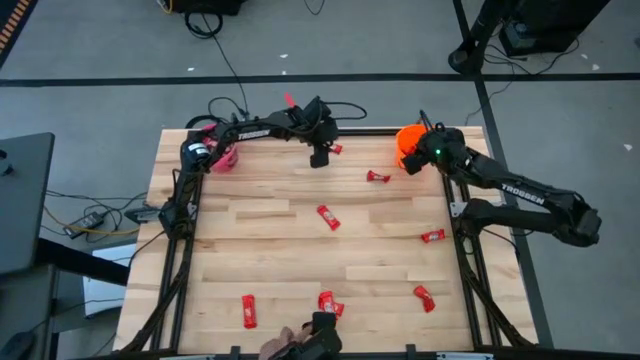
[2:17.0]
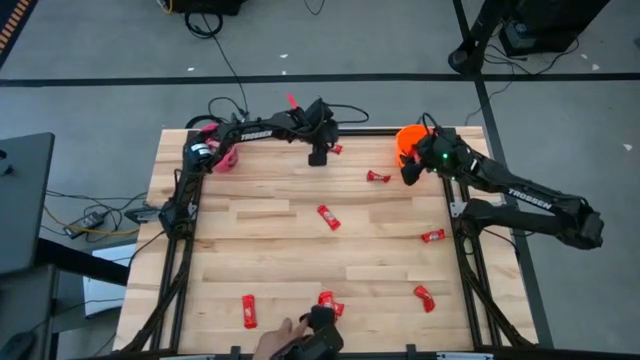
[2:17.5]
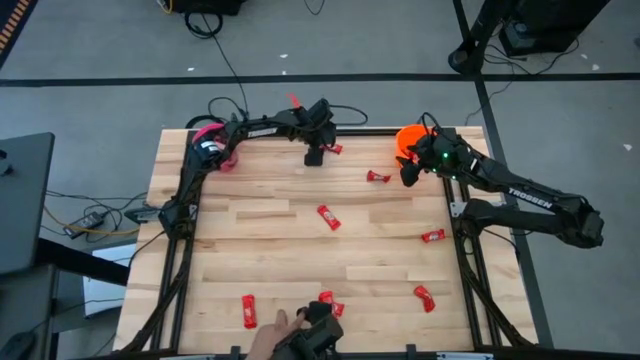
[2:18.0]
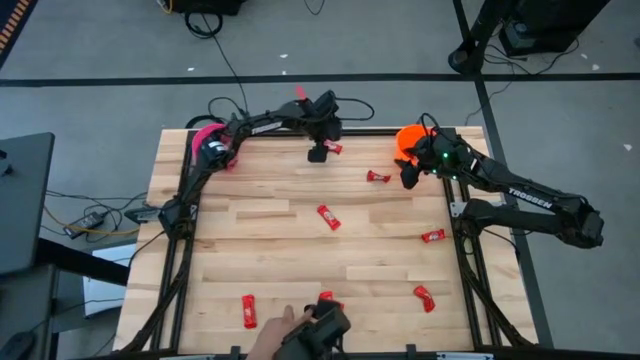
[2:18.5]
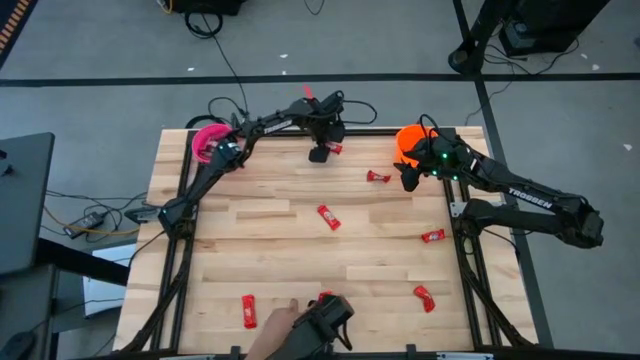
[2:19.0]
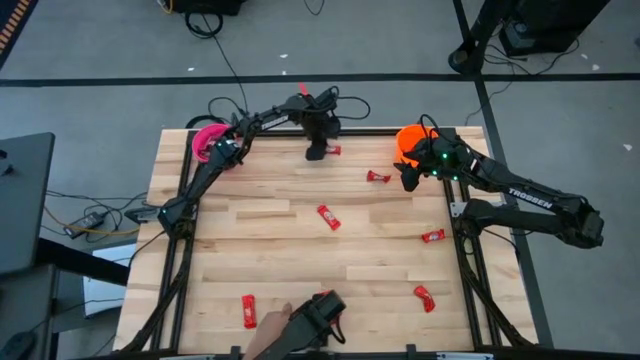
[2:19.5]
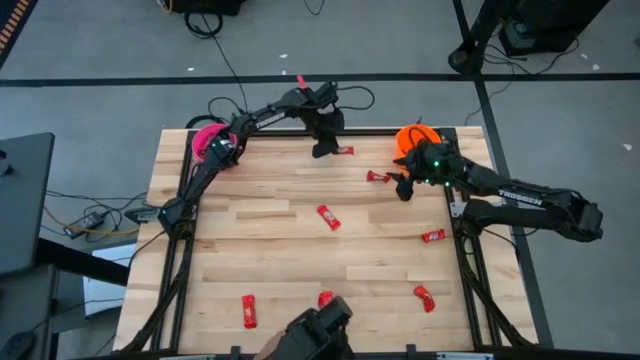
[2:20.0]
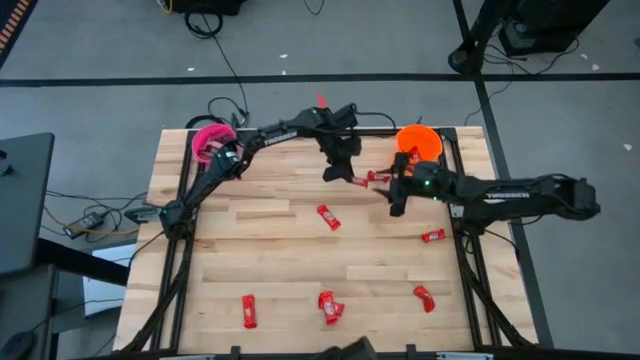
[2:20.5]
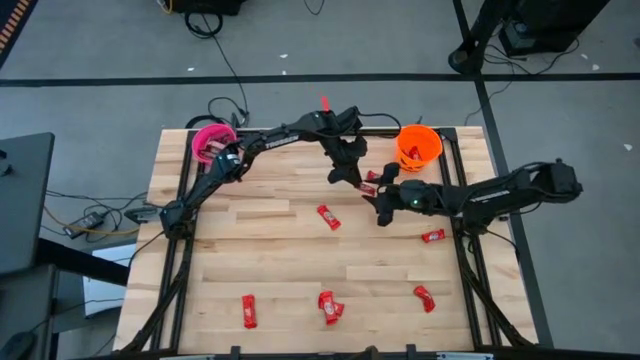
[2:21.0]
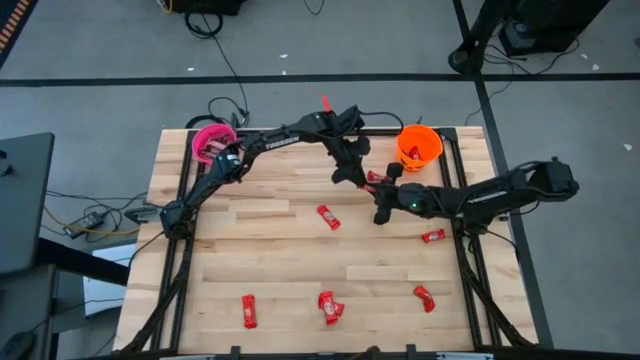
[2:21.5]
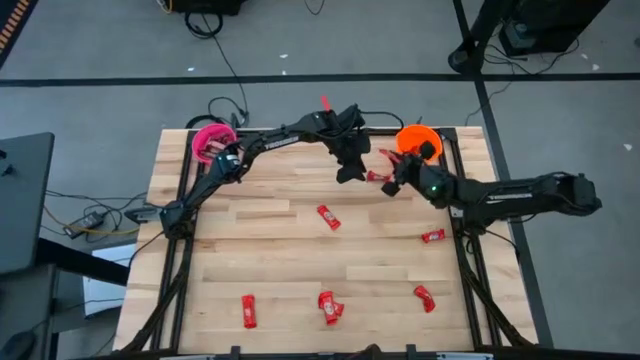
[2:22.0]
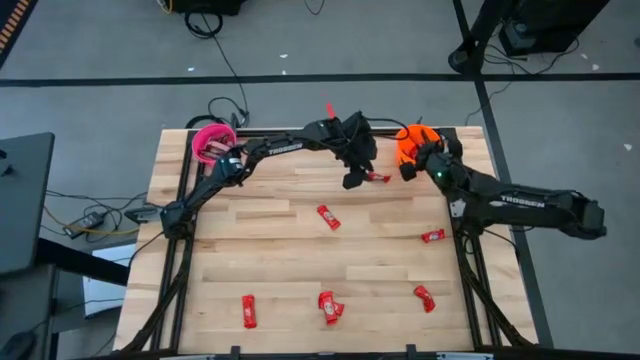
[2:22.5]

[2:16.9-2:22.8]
Task: Sort candy by brand, put in halloween buckets
Put the red chocolate bar into the orange bucket

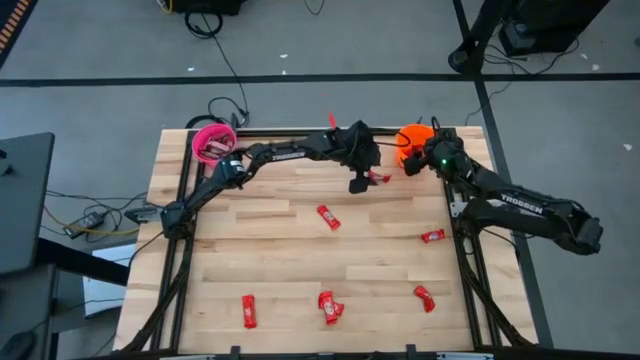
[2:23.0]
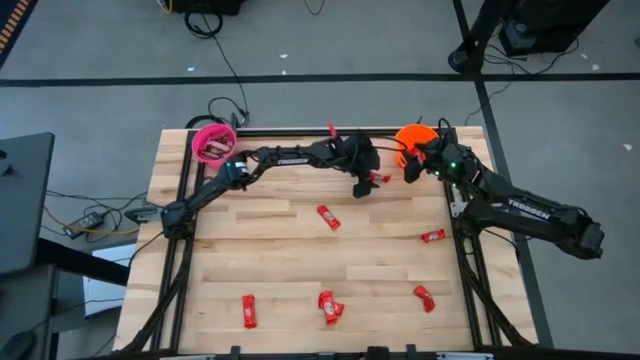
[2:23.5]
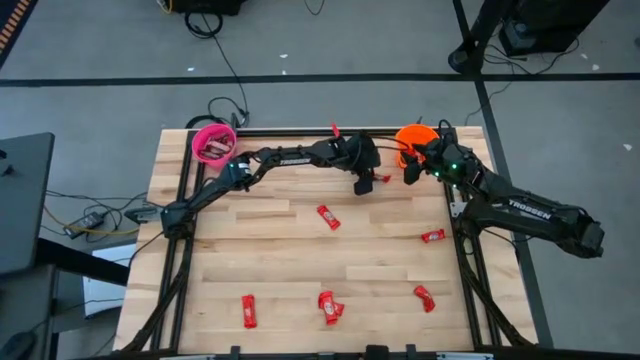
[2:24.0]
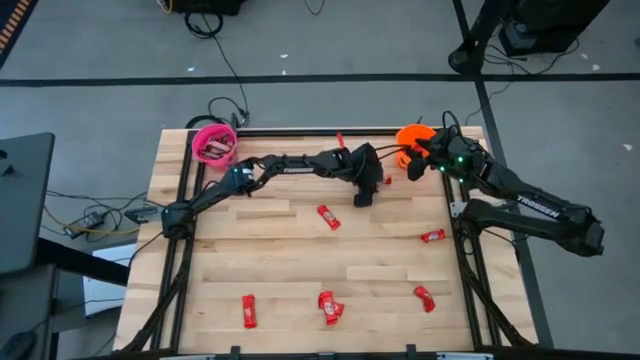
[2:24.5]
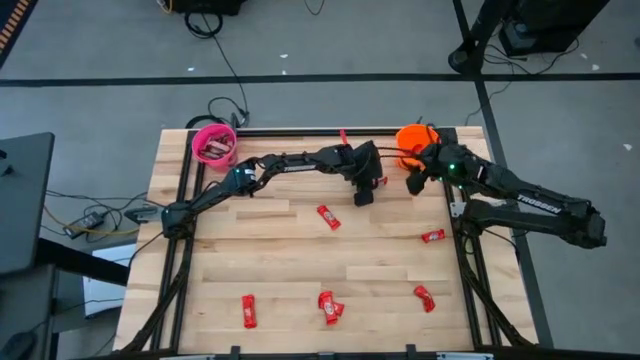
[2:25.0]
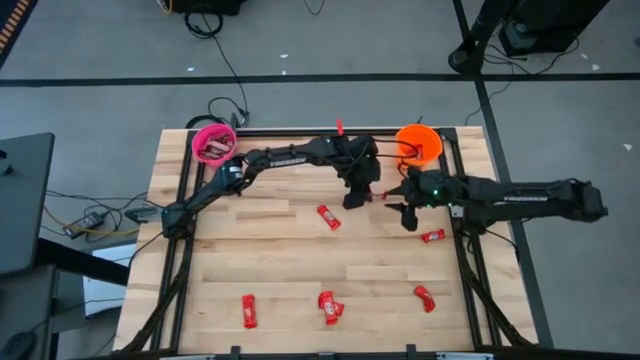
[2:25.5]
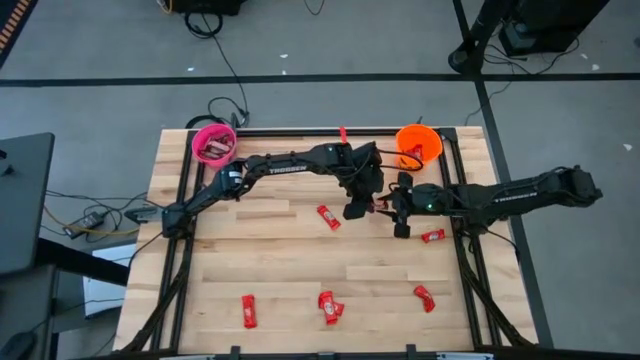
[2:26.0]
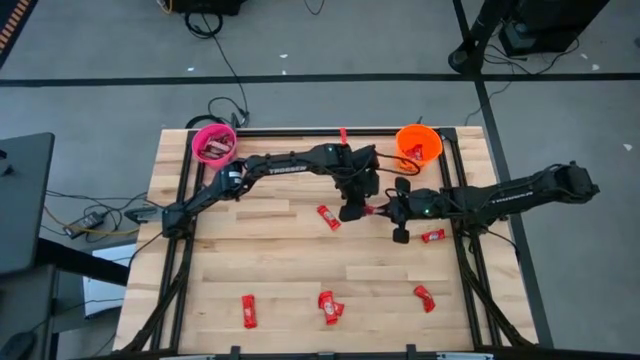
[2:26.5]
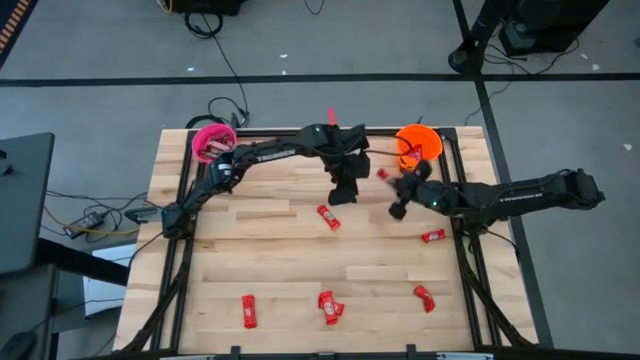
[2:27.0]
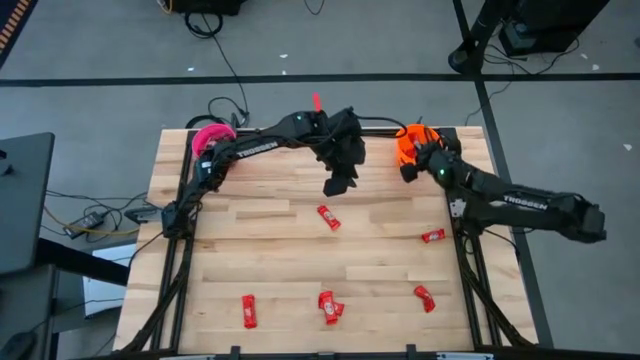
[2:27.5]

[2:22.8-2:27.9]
Put the red chocolate bar into the orange bucket

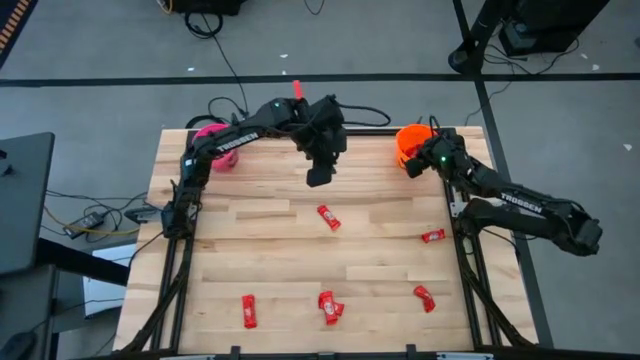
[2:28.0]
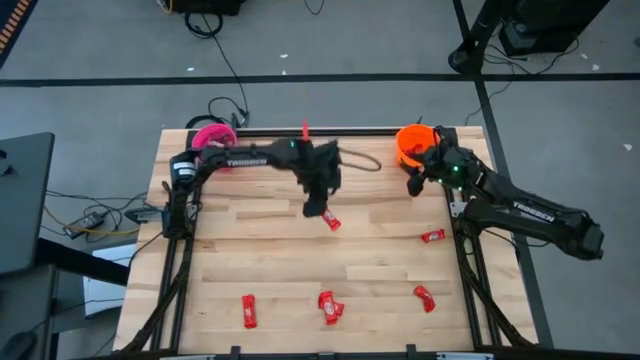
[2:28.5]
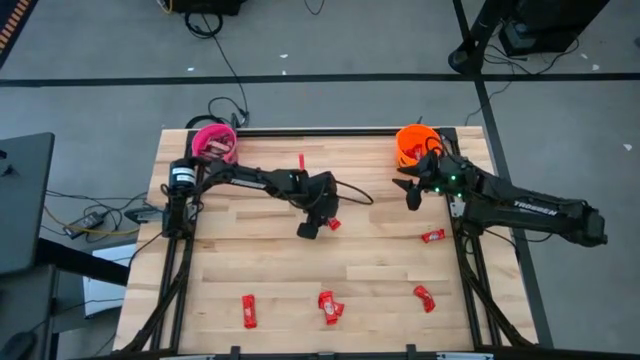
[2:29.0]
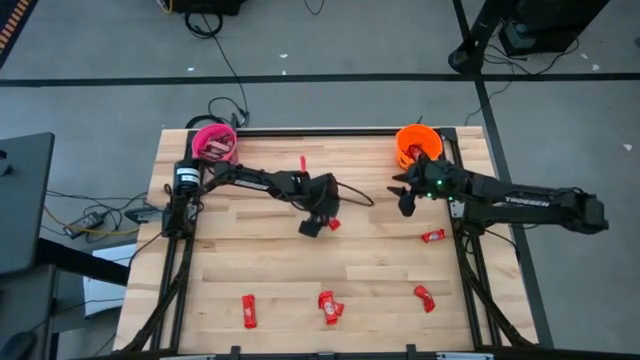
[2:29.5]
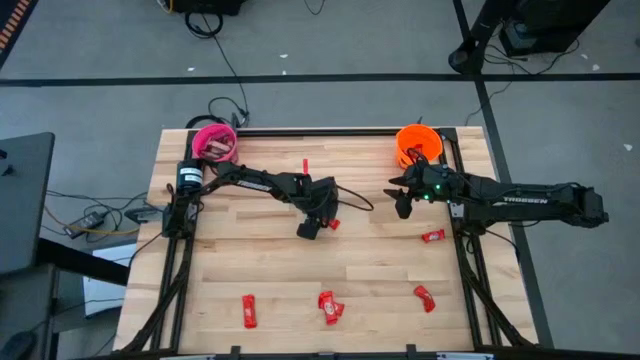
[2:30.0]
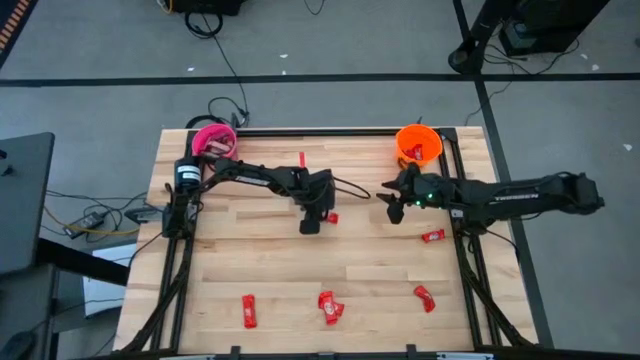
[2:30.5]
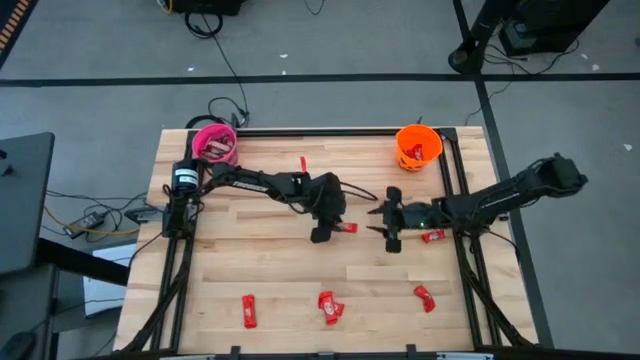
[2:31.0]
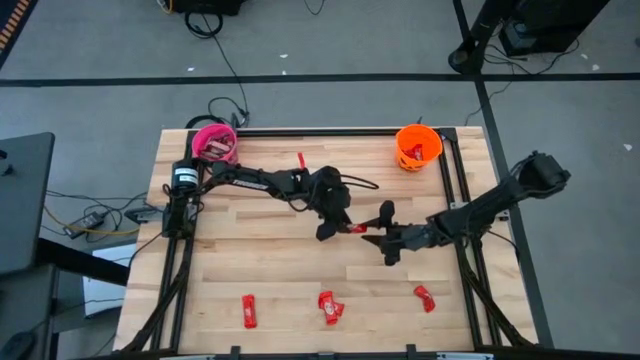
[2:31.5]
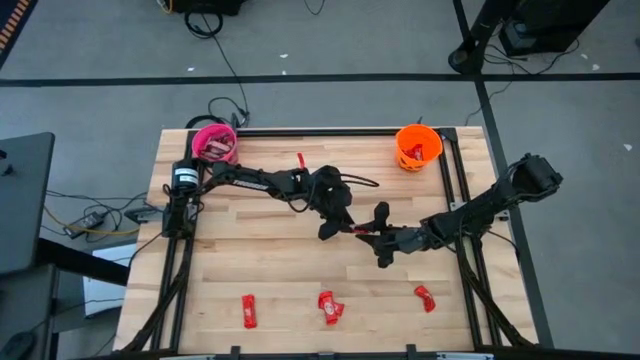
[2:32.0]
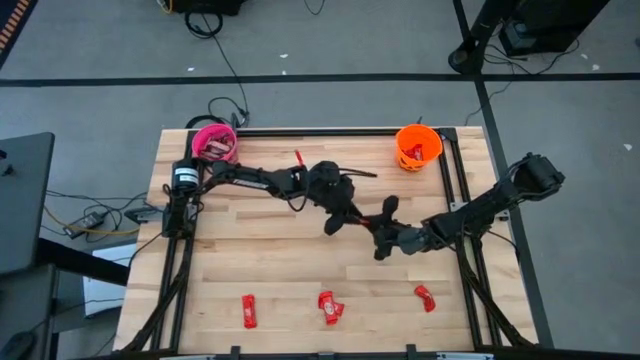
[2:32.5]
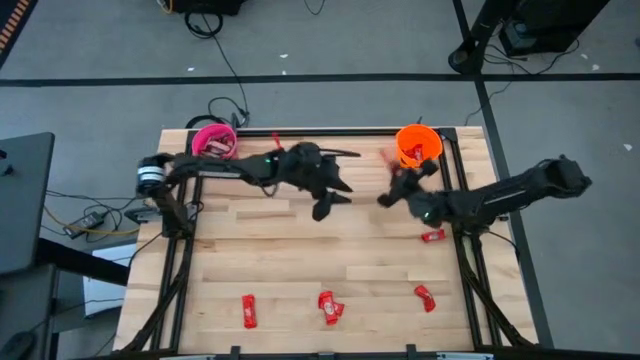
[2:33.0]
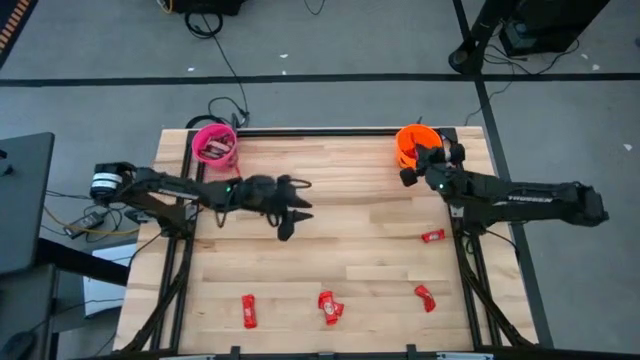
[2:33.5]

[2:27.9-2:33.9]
Put the red chocolate bar into the orange bucket

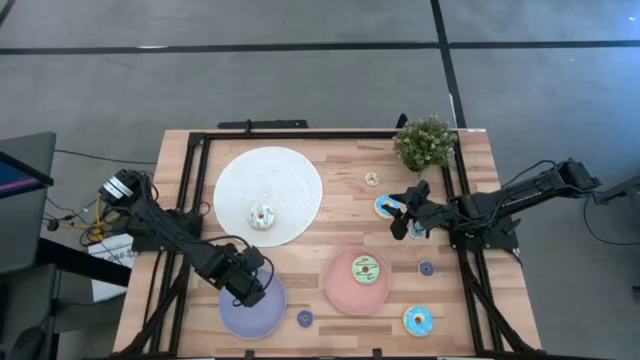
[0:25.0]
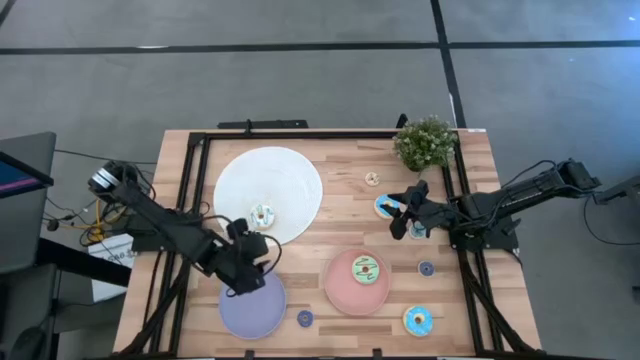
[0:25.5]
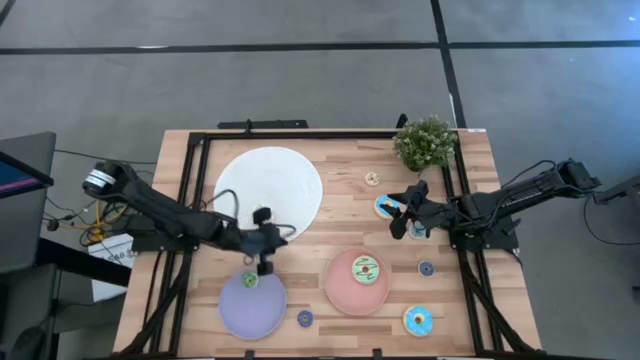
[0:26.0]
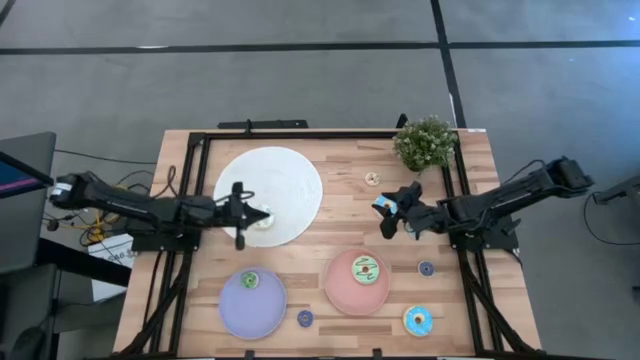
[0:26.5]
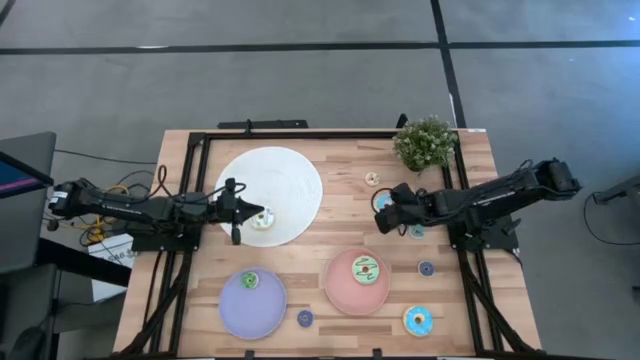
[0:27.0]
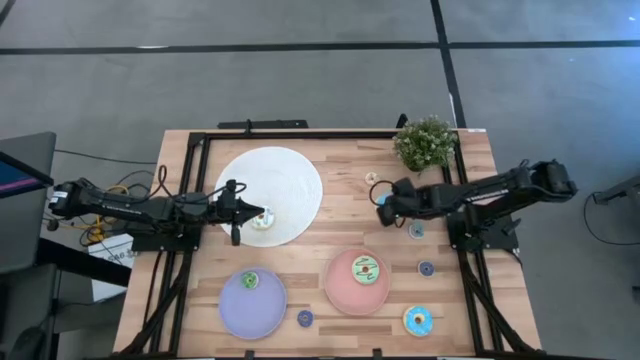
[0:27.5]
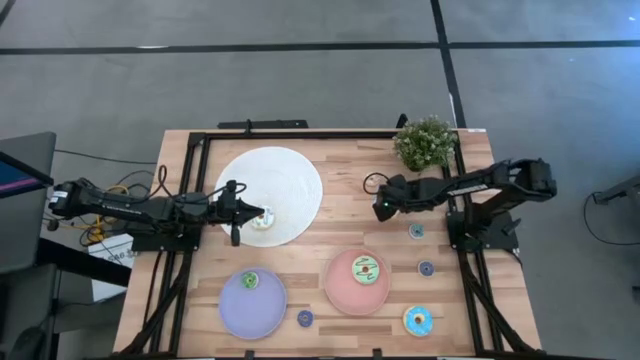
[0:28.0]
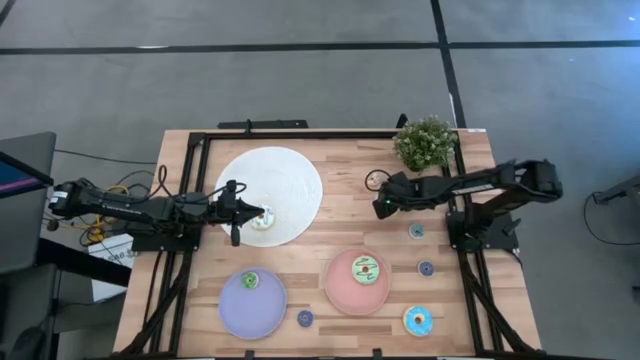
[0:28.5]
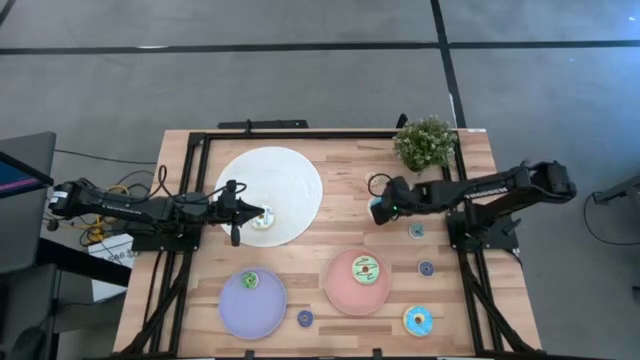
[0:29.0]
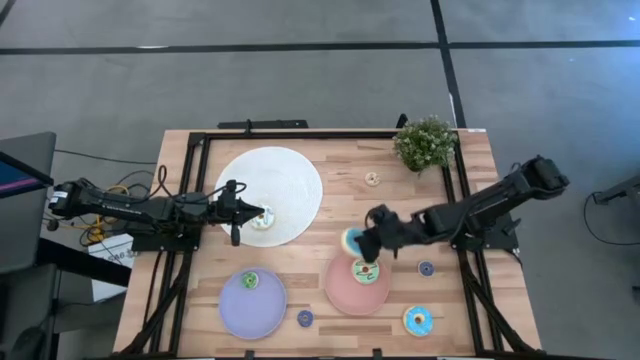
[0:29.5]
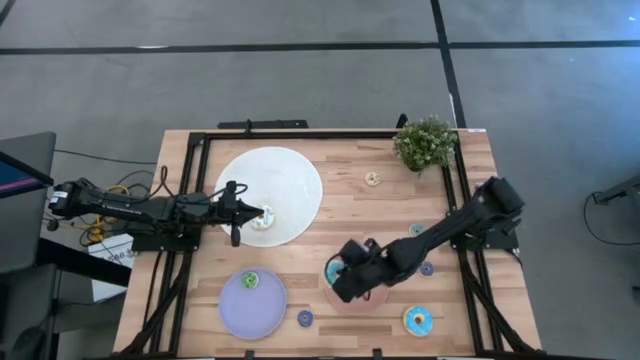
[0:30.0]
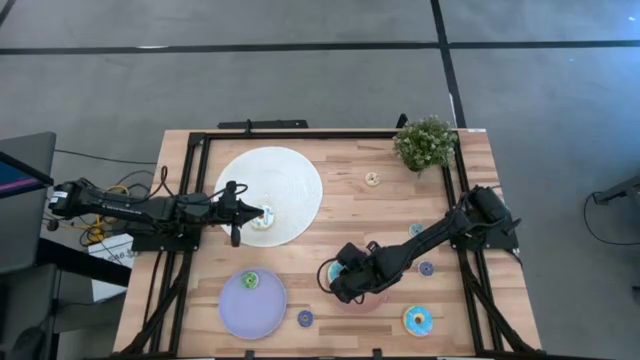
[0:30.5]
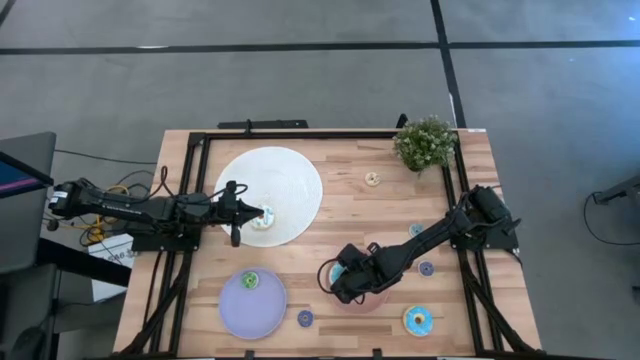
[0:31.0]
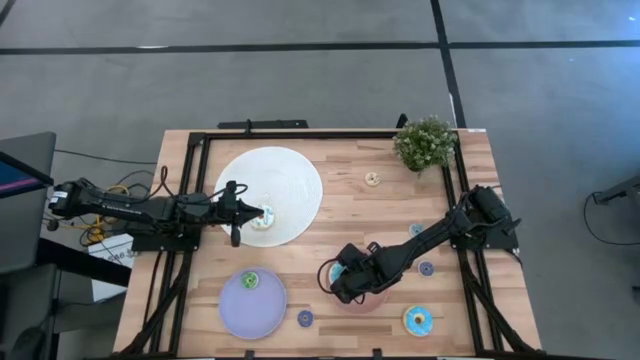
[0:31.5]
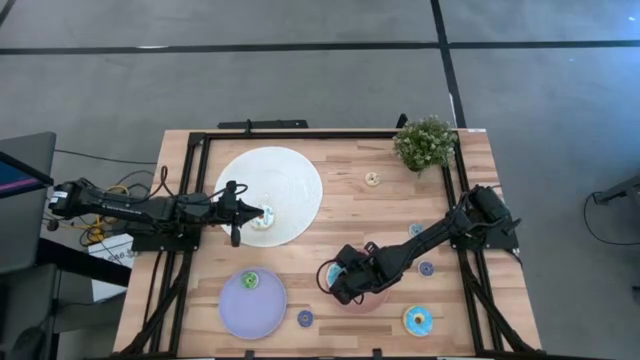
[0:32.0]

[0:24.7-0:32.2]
Task: Pick & Place donuts
Put the top large blue donut on the pink plate
